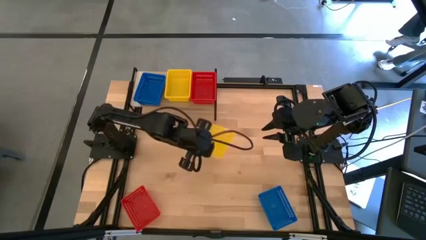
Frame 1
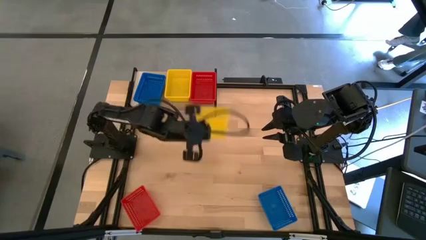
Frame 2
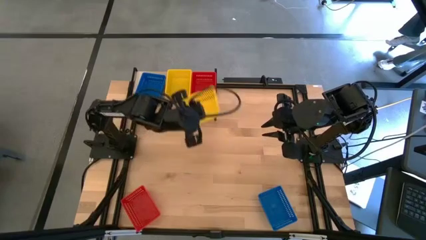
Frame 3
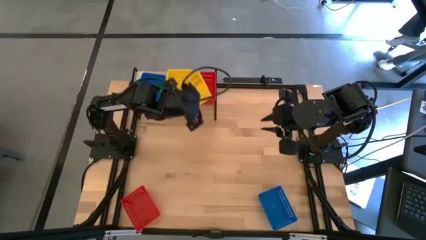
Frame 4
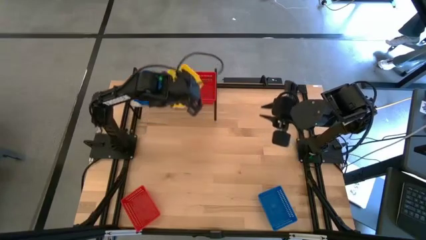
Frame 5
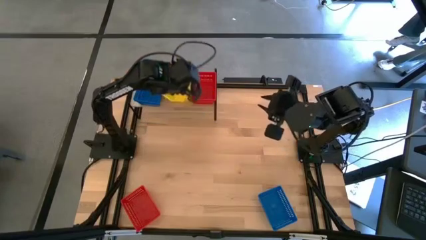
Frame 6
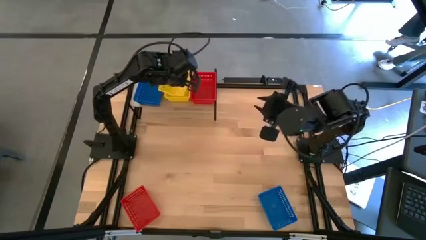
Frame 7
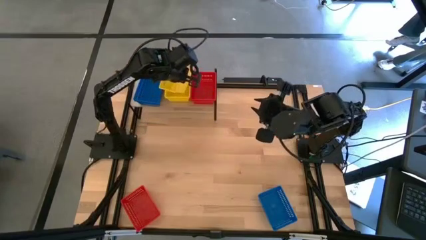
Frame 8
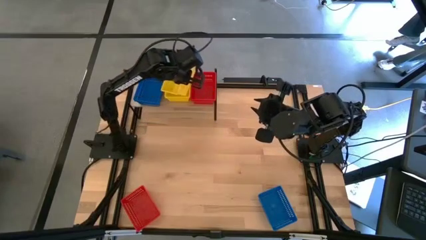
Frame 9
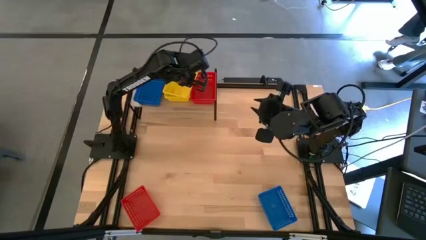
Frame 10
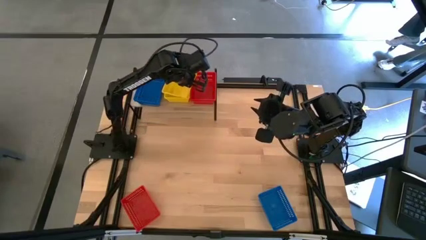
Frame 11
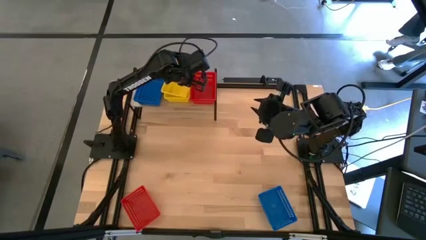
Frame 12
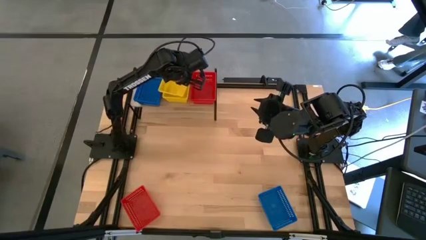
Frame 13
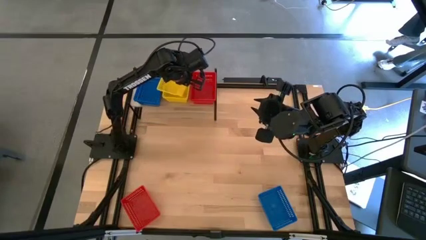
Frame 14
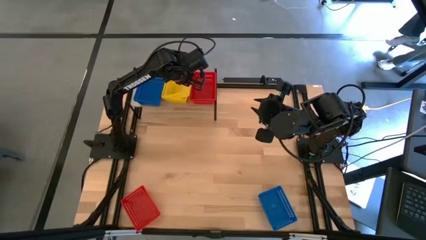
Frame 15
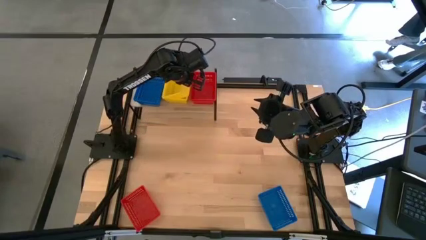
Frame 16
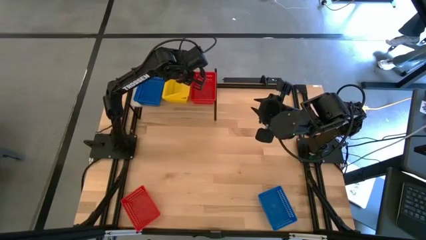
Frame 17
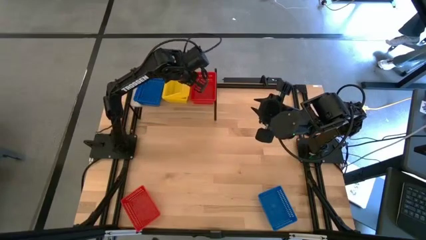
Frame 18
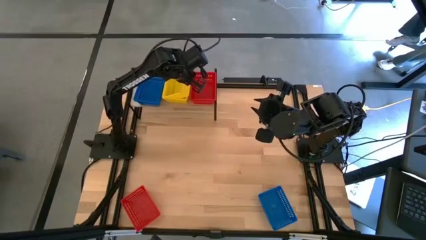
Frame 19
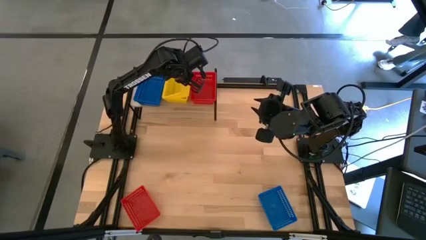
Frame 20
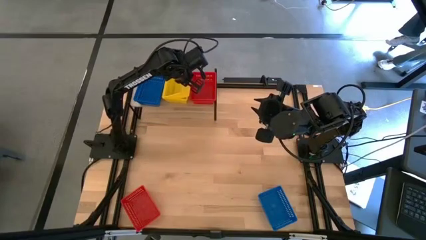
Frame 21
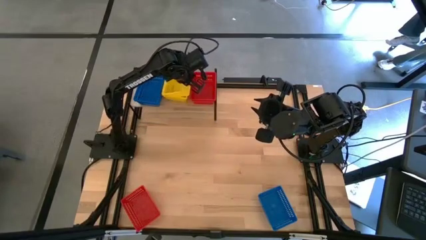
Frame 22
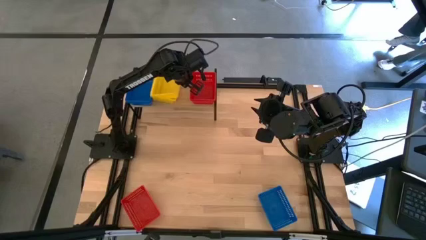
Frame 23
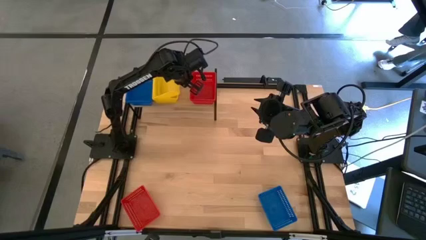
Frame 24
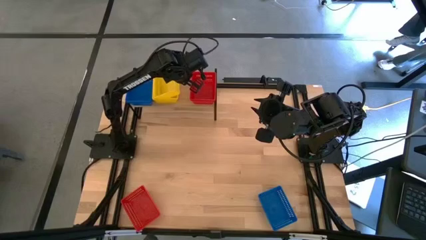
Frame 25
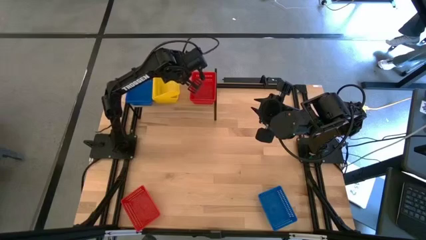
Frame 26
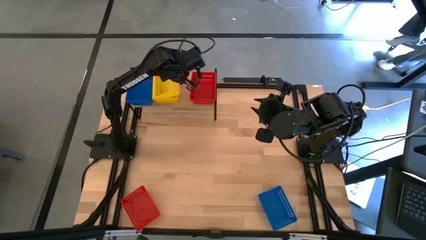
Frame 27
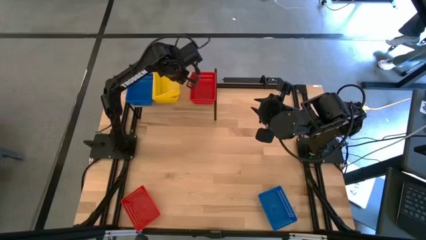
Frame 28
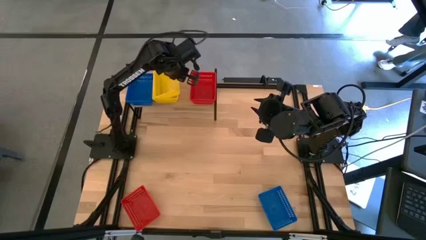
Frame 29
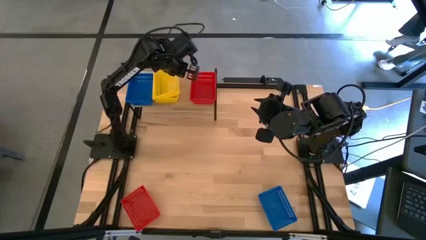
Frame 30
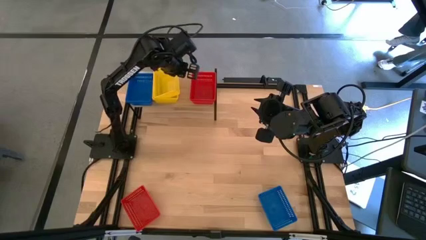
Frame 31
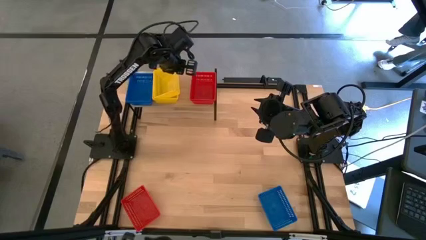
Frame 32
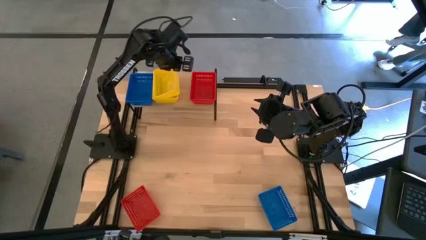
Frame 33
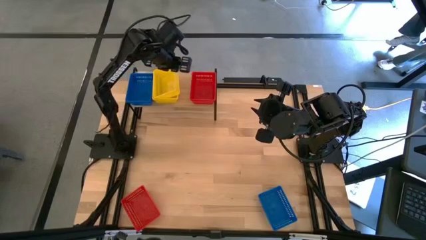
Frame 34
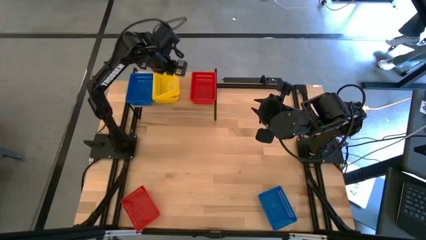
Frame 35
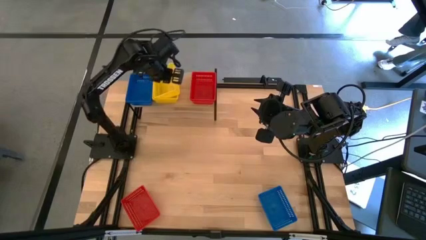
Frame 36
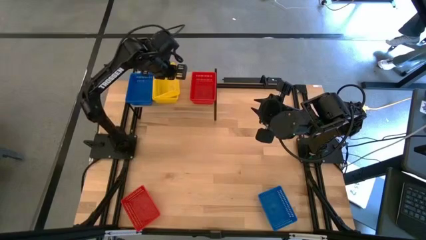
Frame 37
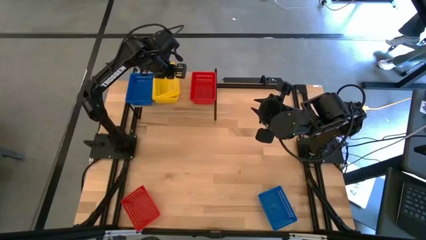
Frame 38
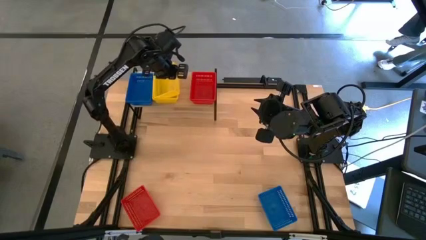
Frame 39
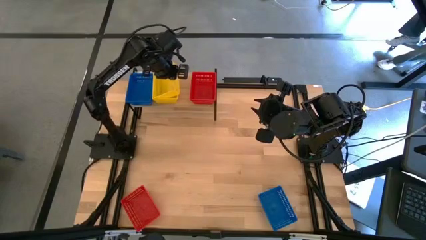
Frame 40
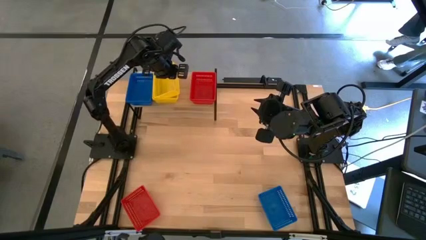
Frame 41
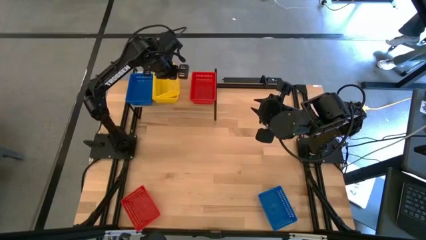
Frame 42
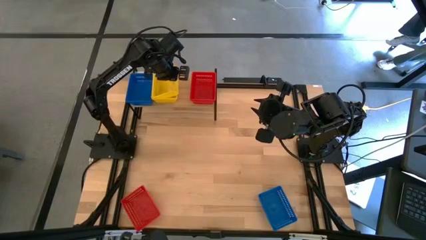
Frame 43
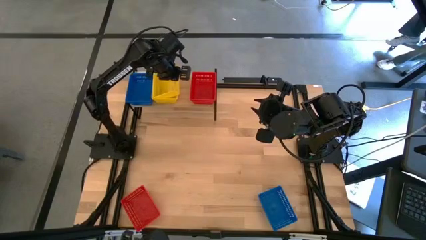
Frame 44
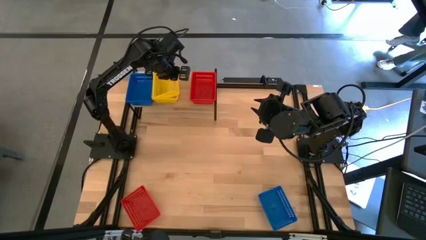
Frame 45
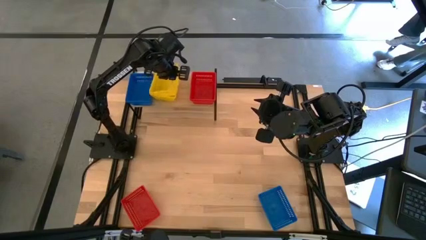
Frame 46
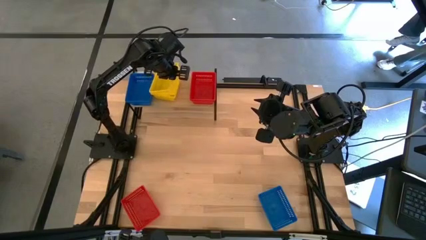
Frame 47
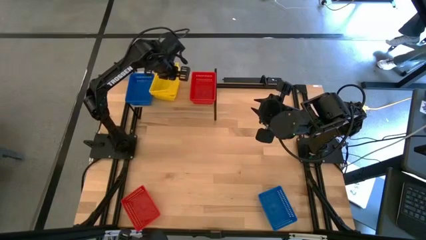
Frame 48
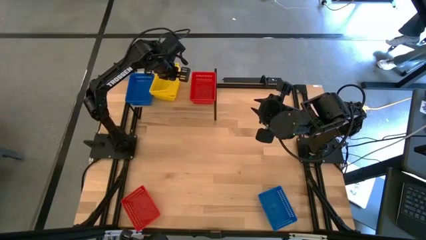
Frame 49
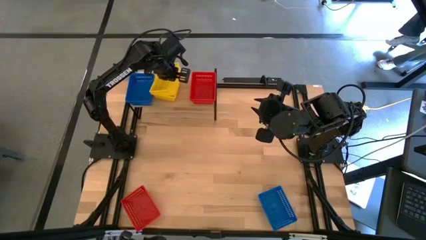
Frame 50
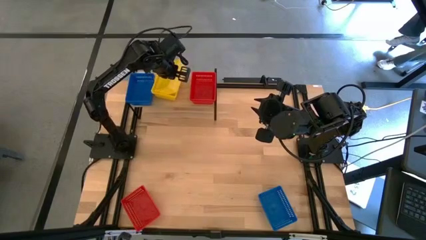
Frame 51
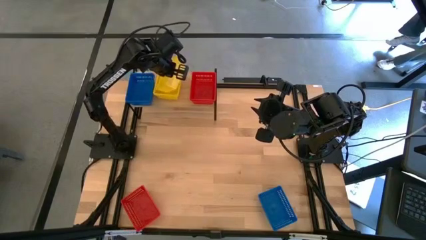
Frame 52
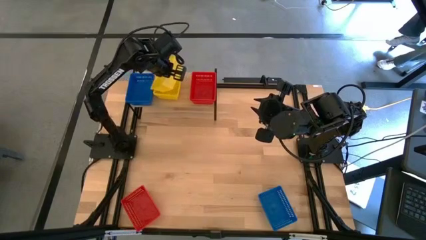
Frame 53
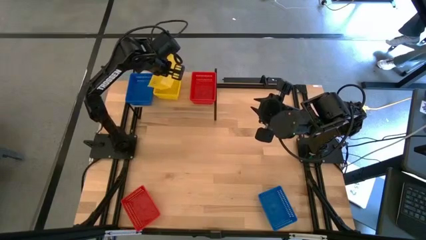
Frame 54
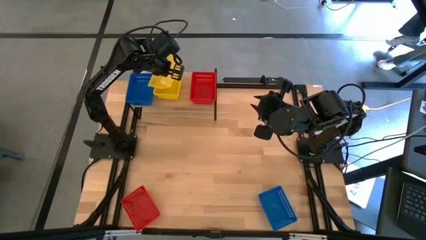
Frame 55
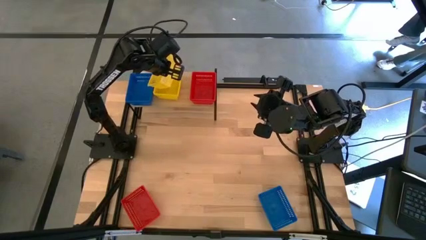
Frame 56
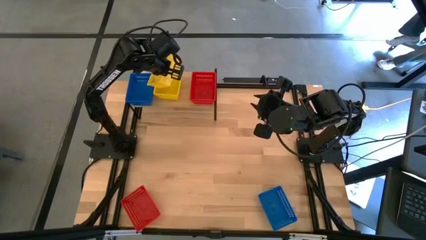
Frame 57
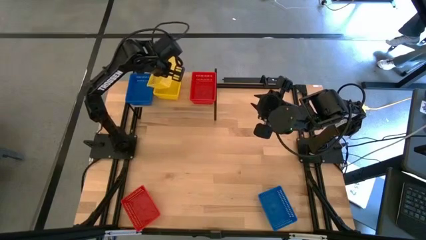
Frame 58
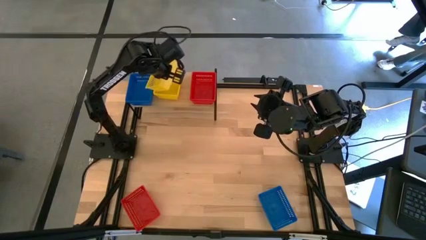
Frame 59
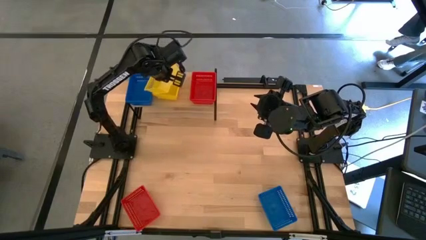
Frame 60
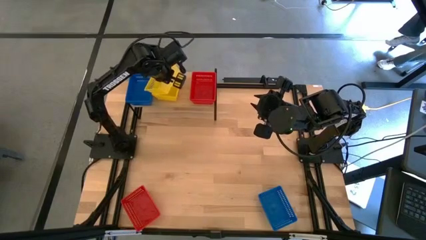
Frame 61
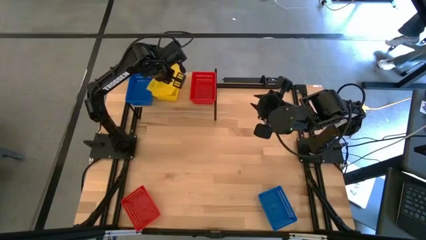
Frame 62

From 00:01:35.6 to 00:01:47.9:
Task: Stack baskets on shelf by color
Stack the yellow bin on top of the yellow bins on the shelf

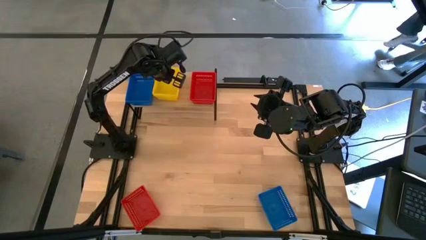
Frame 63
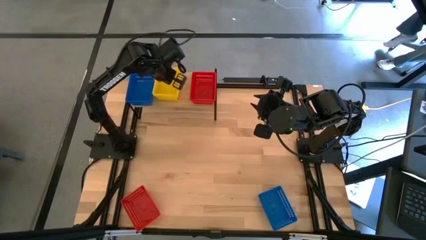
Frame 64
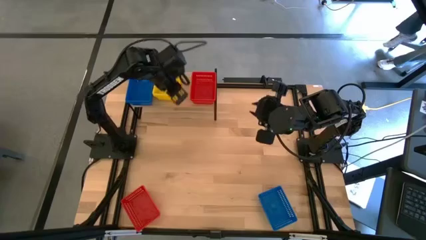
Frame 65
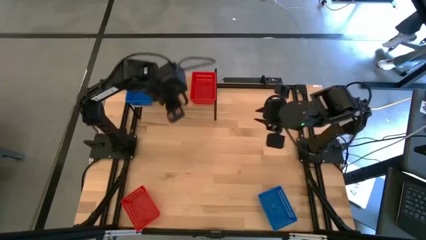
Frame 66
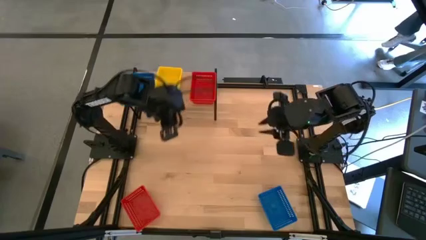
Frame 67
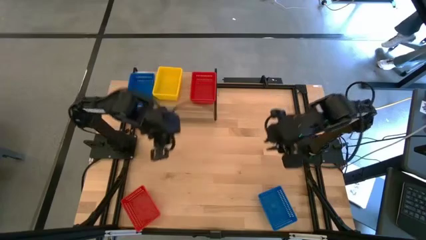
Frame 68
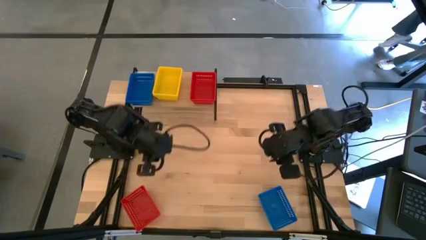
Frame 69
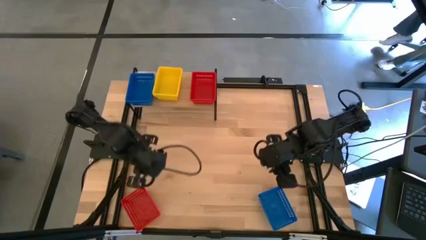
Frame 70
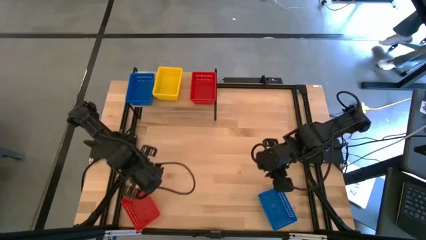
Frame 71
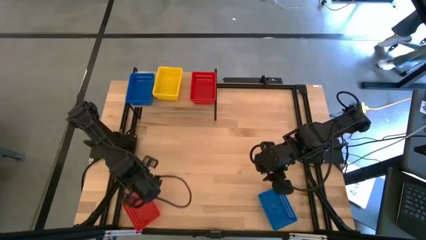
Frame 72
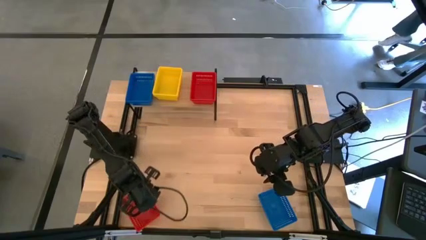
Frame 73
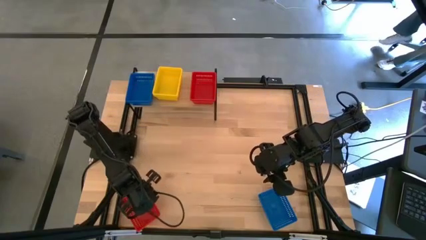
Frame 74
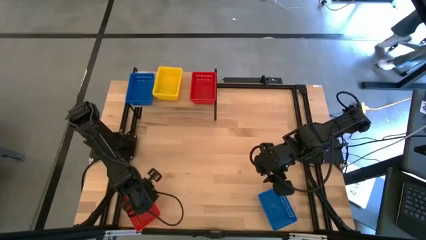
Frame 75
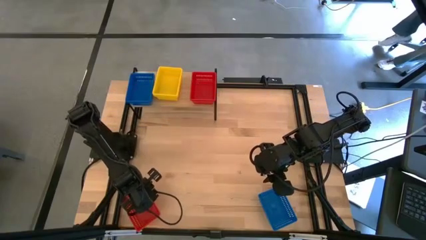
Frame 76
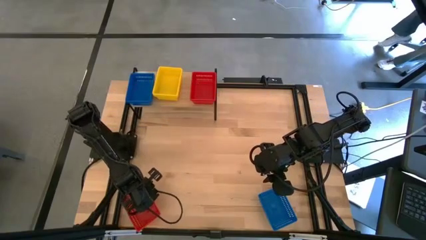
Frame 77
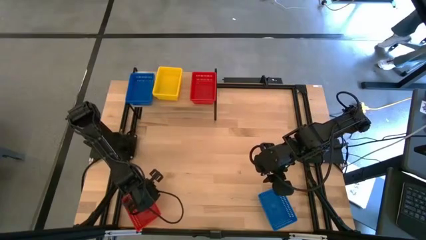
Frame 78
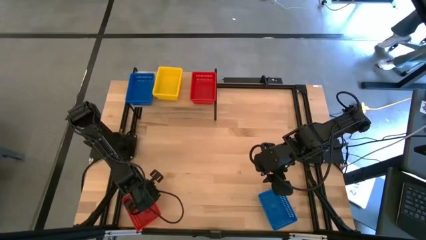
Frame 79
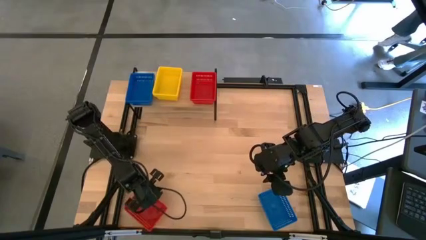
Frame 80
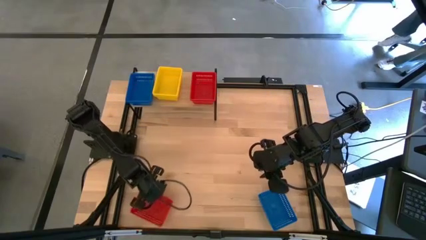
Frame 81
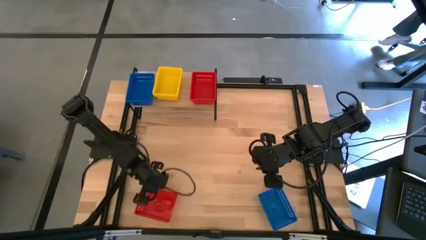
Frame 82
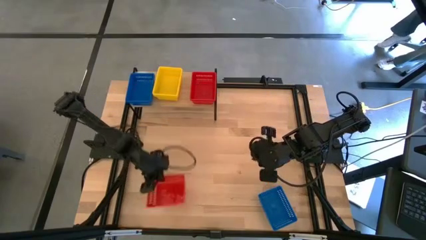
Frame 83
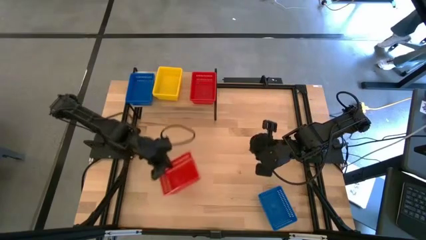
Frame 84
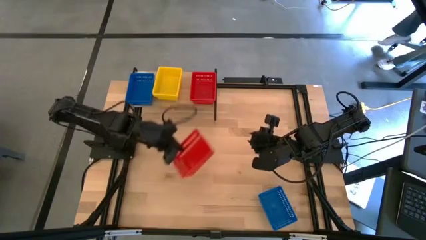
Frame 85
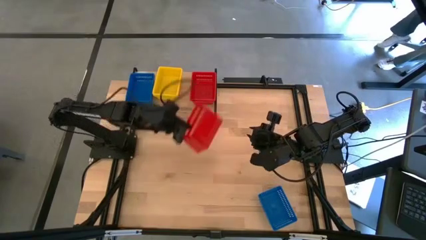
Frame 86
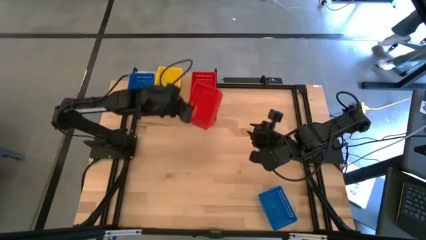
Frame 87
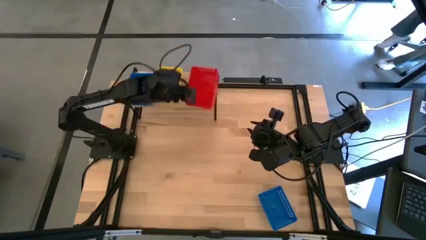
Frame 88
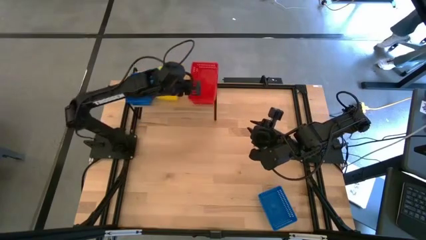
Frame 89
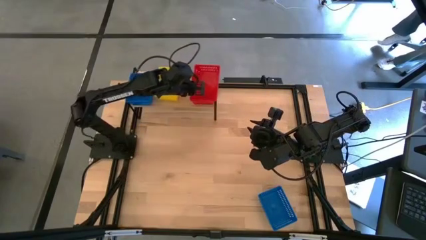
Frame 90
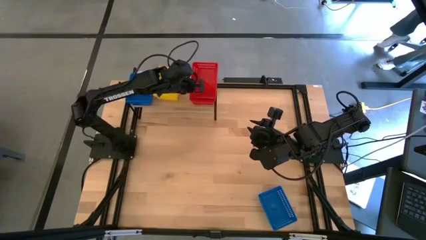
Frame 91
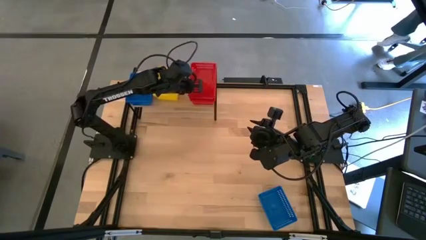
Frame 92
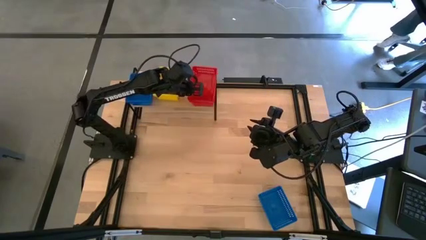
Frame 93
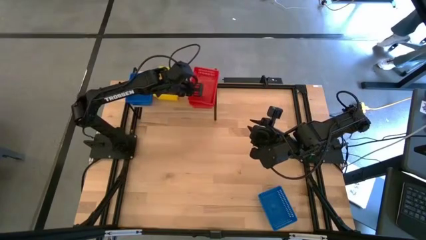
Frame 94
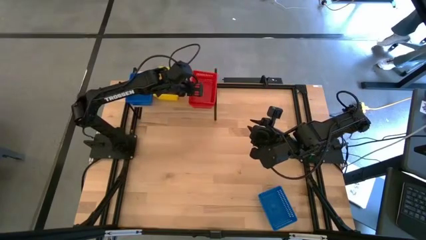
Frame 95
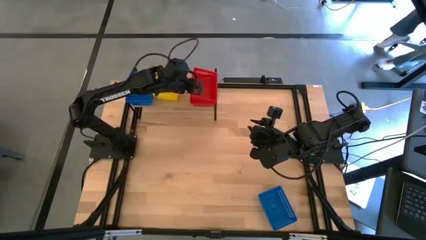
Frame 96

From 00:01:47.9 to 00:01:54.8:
Stack the red bin on top of the red bins on the shelf
